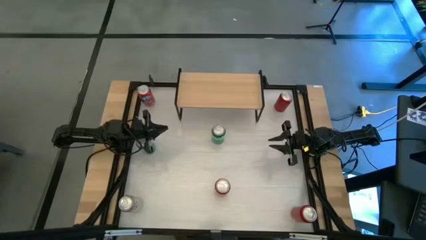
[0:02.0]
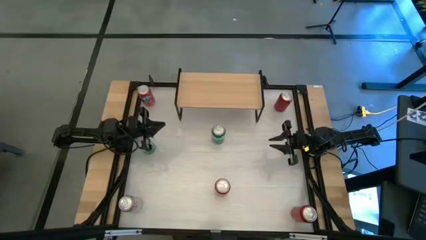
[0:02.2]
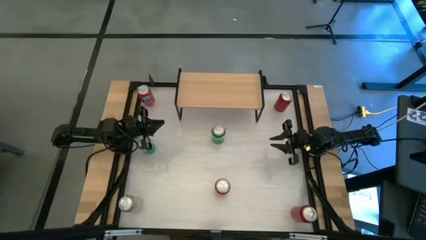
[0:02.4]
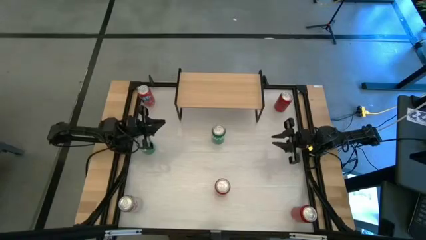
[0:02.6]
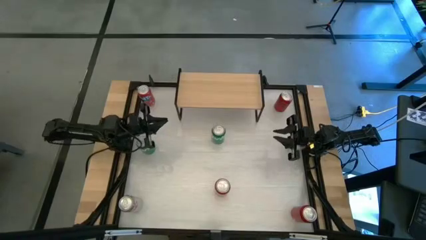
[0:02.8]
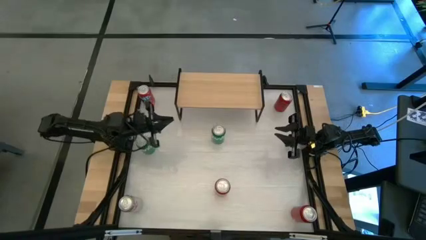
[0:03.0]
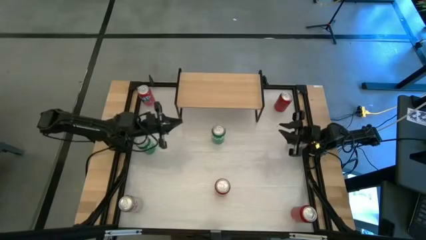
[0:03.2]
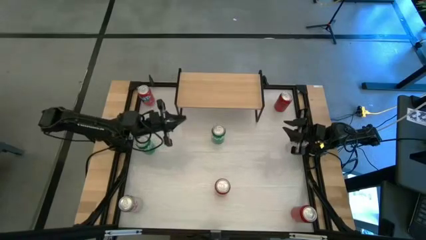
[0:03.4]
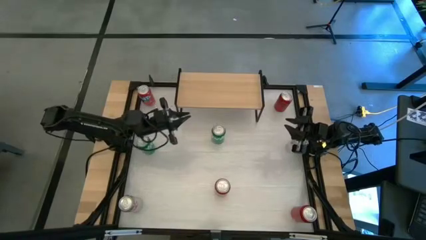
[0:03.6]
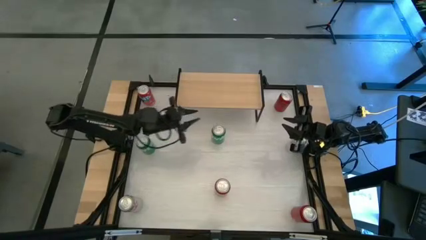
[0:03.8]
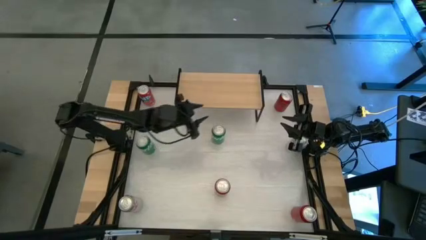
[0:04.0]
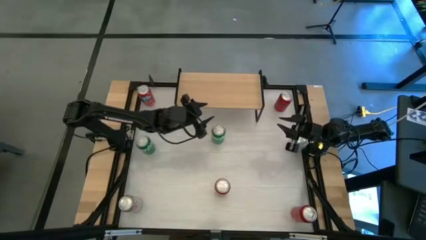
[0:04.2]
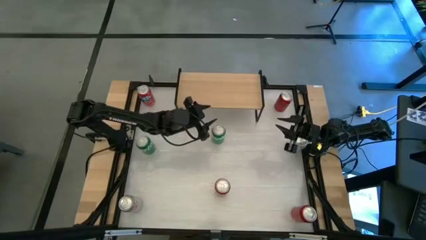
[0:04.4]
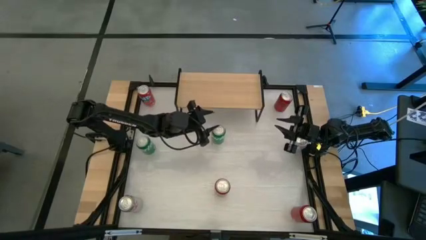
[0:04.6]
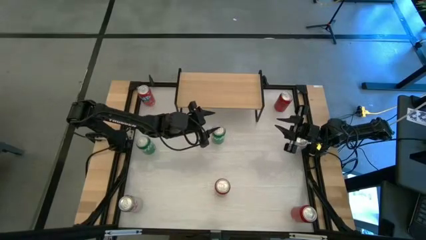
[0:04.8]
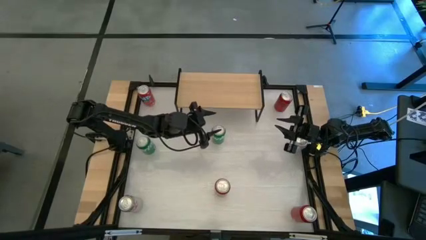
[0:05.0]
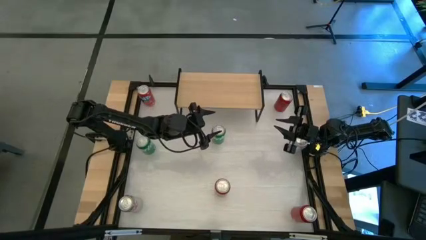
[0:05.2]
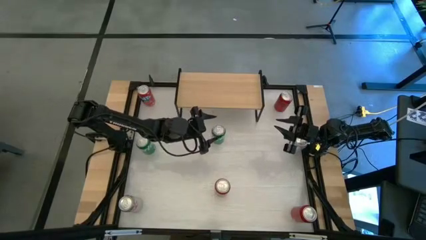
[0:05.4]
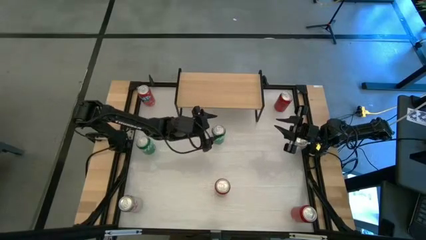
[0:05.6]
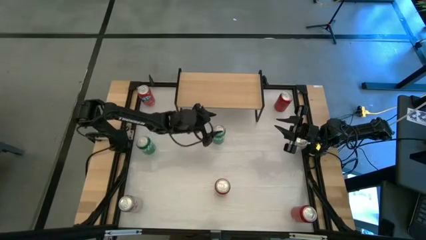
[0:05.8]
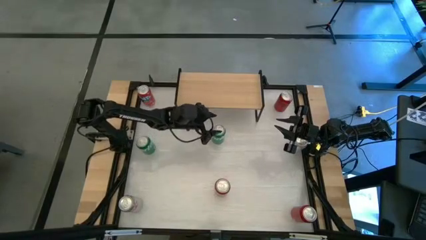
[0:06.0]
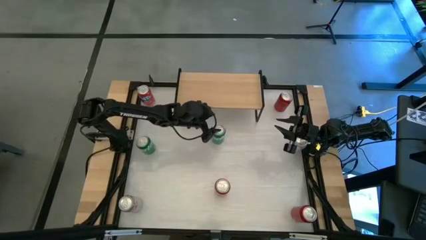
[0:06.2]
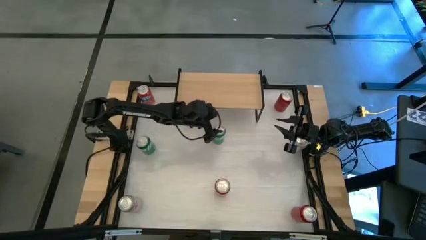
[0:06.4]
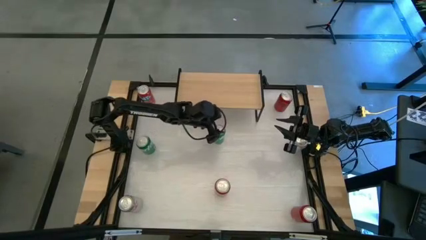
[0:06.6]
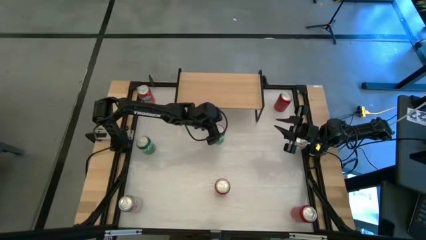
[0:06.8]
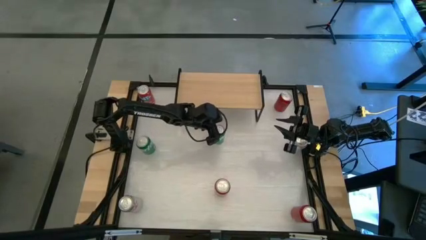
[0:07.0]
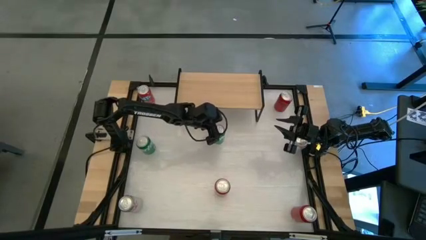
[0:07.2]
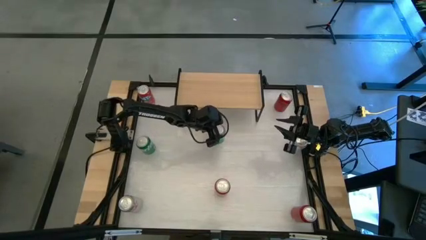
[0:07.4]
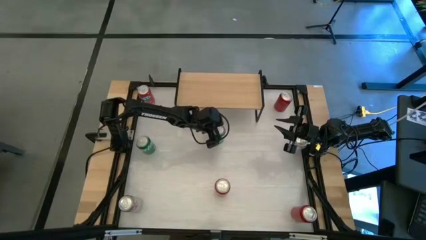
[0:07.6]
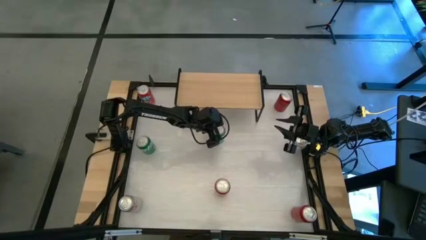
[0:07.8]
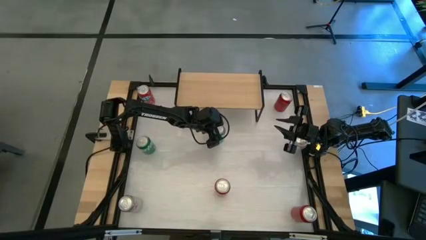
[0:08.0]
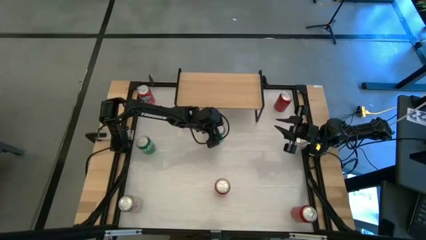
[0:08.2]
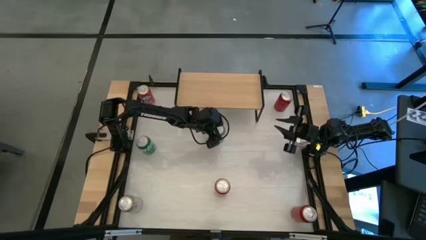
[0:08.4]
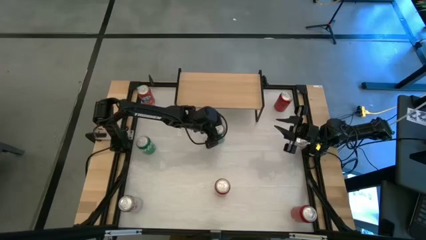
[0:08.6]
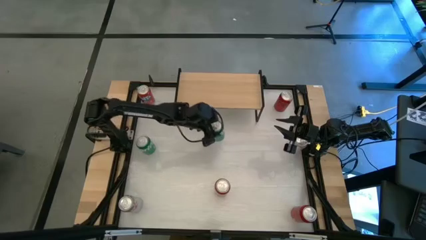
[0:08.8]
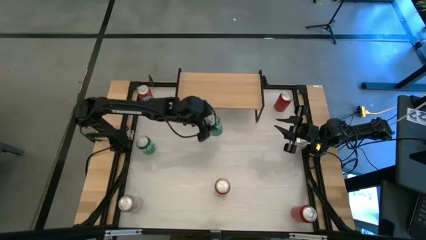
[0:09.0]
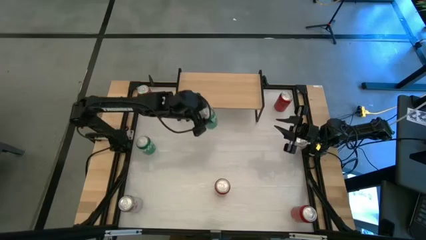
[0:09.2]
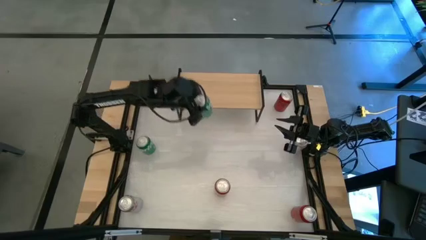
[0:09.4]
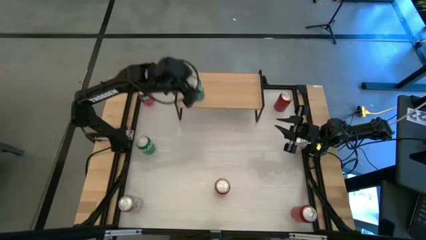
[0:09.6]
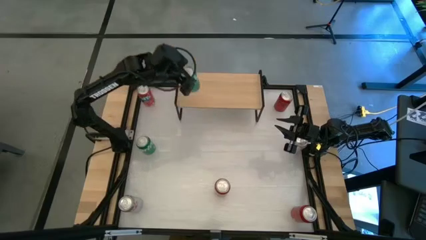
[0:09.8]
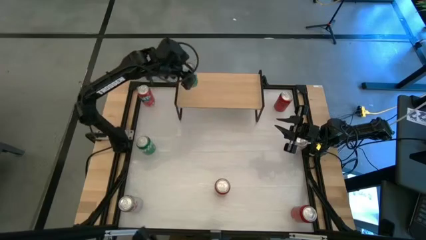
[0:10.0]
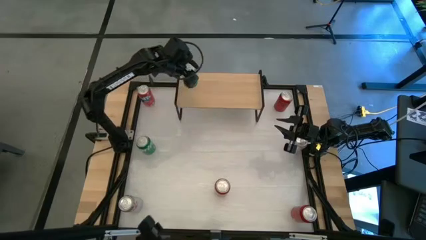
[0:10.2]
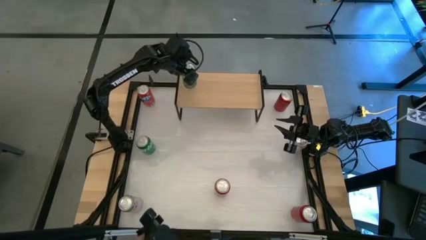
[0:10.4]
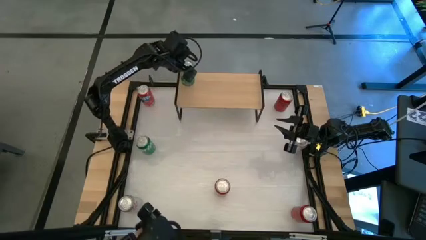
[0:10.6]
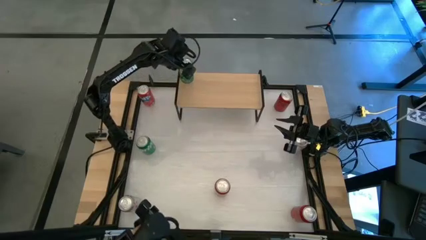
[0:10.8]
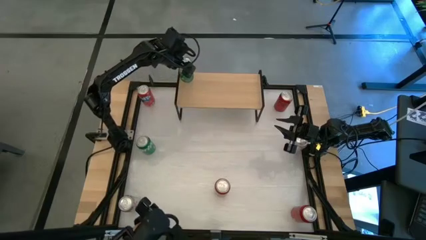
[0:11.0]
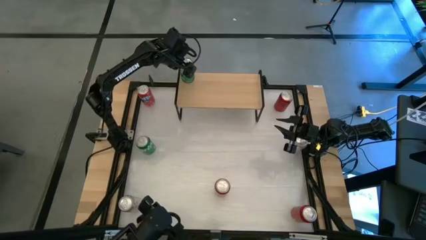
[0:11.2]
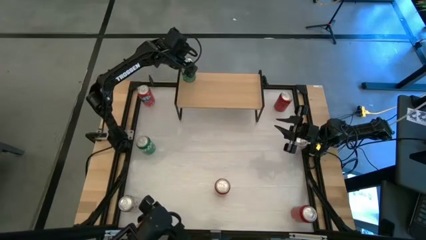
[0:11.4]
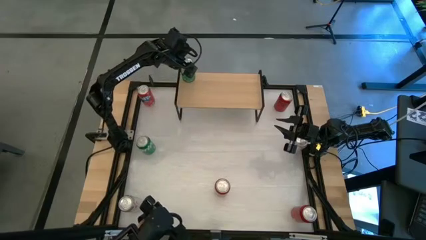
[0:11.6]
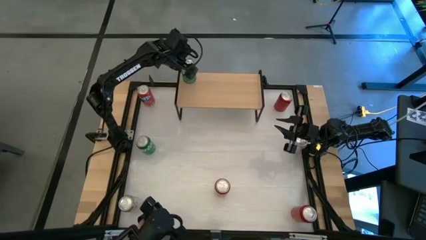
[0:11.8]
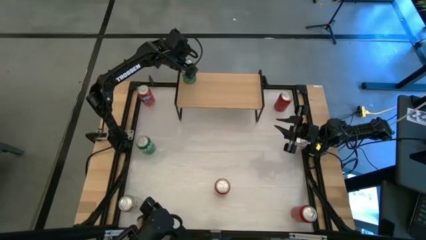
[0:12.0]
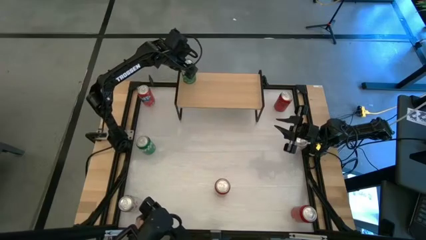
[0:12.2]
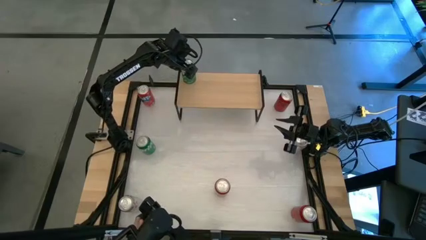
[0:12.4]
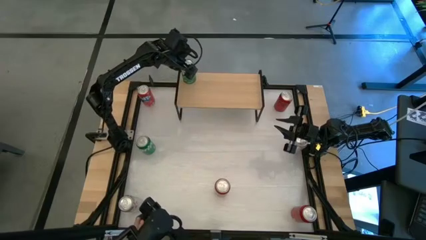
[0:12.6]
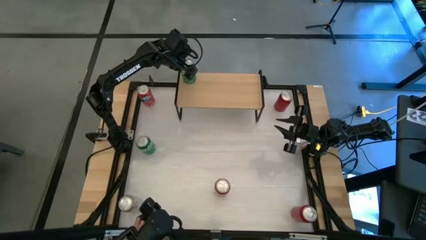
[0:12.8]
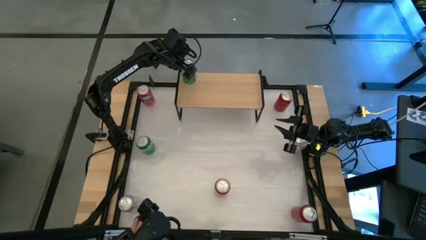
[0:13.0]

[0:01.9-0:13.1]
Task: Place canned beverage on shelf
Put the right green soda can on the shelf
